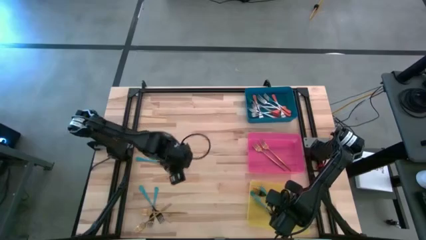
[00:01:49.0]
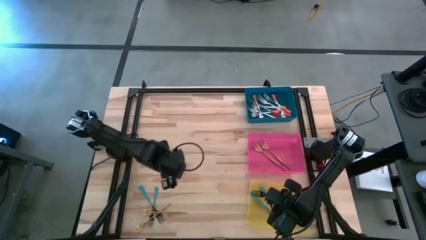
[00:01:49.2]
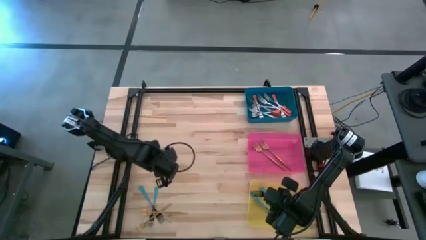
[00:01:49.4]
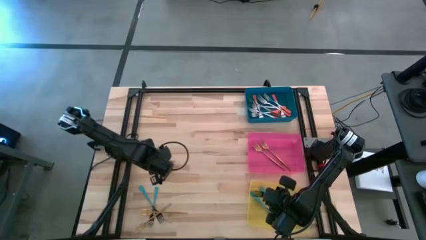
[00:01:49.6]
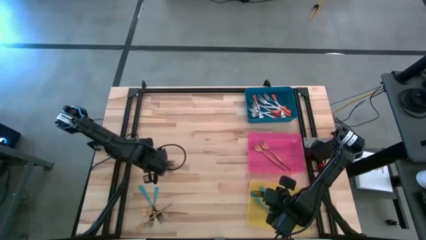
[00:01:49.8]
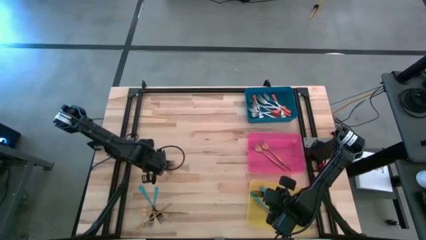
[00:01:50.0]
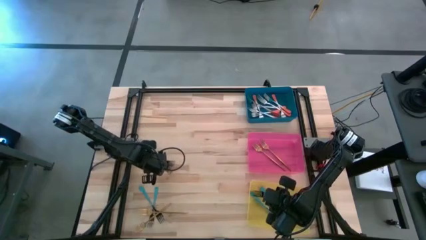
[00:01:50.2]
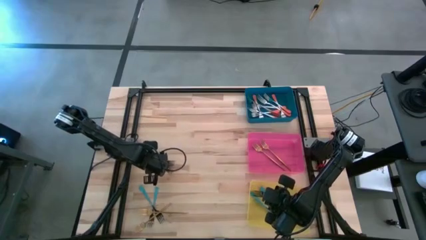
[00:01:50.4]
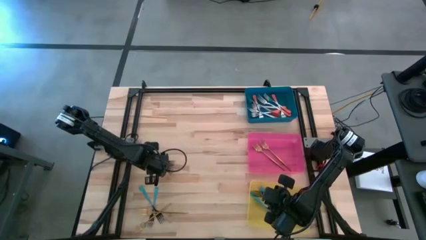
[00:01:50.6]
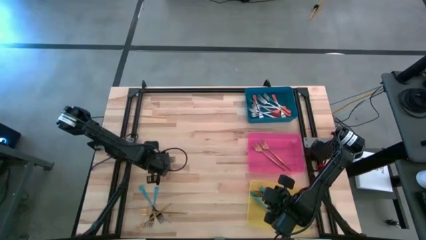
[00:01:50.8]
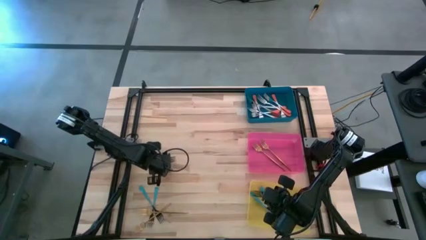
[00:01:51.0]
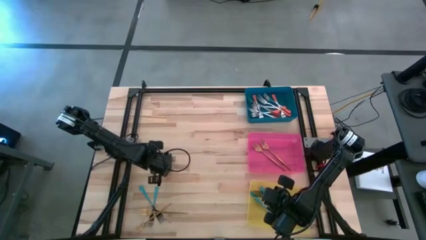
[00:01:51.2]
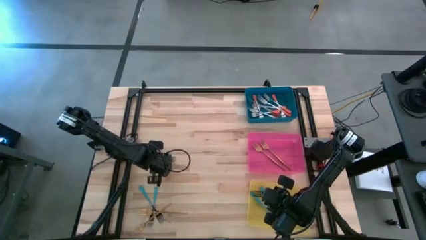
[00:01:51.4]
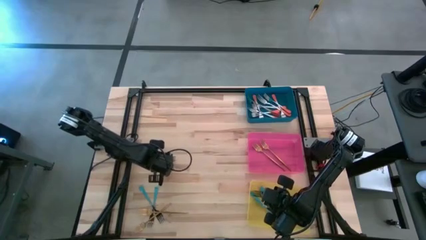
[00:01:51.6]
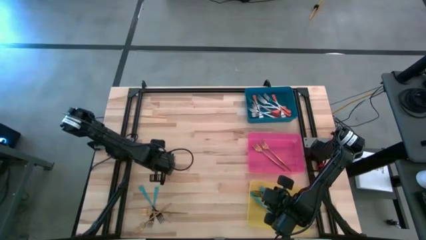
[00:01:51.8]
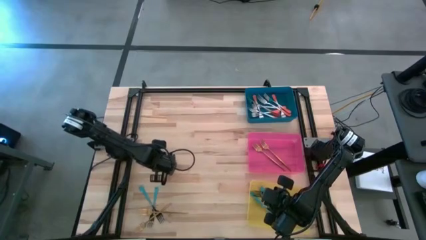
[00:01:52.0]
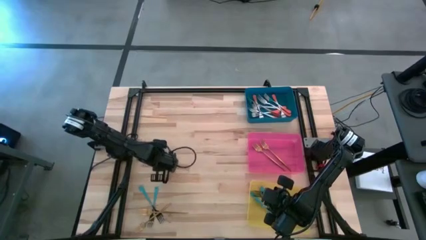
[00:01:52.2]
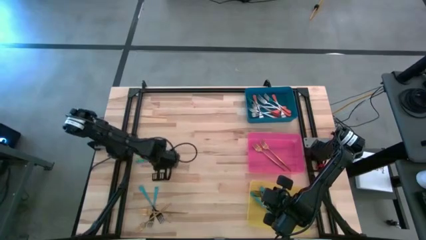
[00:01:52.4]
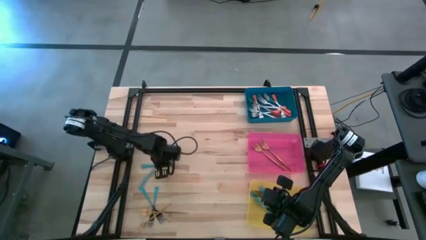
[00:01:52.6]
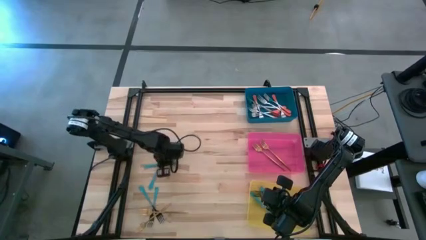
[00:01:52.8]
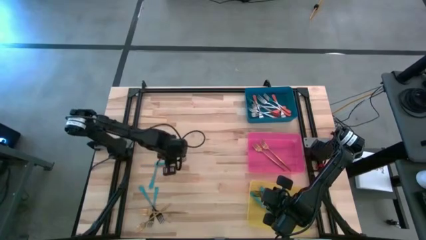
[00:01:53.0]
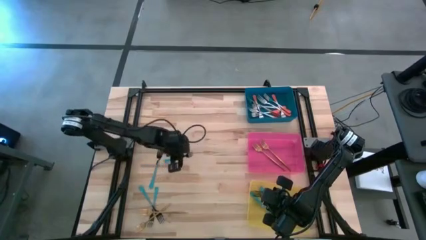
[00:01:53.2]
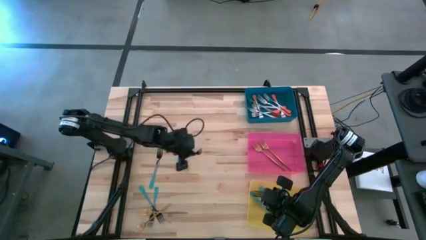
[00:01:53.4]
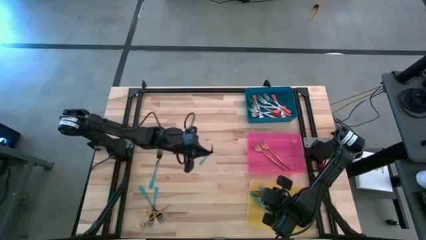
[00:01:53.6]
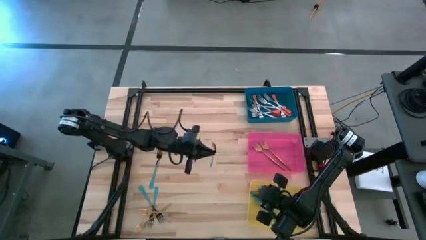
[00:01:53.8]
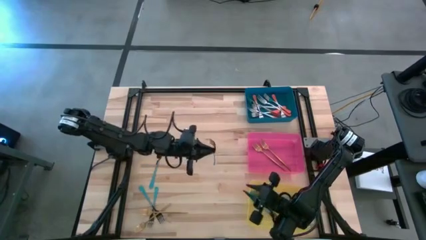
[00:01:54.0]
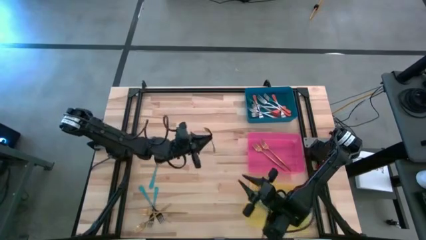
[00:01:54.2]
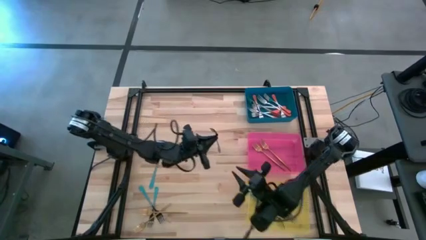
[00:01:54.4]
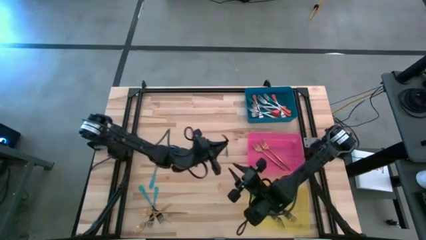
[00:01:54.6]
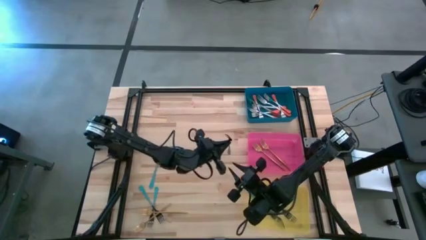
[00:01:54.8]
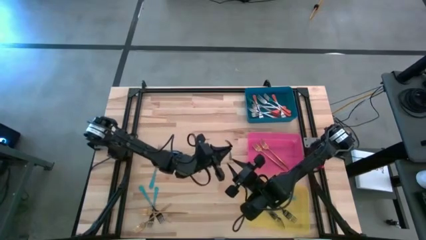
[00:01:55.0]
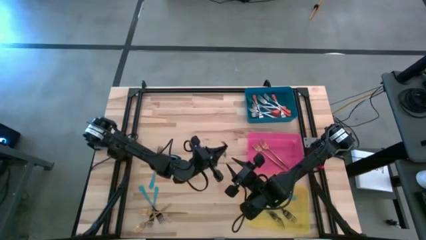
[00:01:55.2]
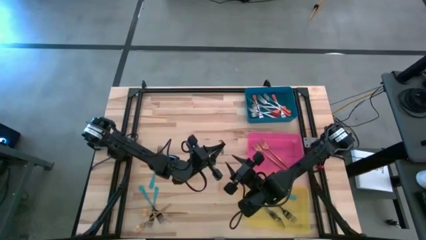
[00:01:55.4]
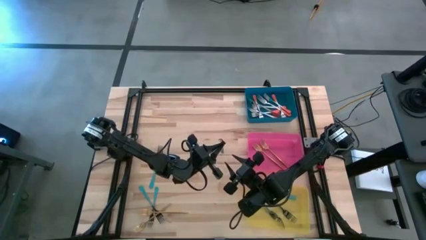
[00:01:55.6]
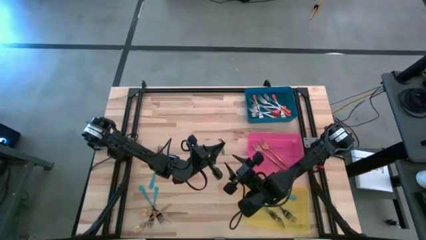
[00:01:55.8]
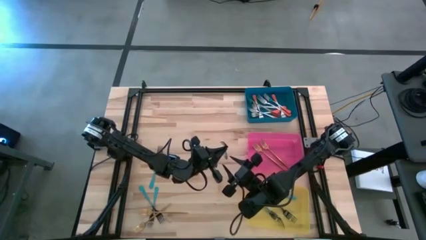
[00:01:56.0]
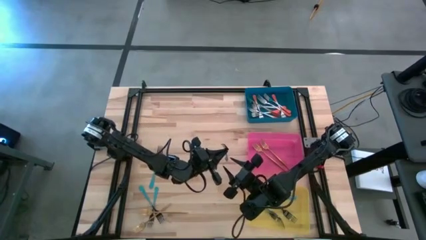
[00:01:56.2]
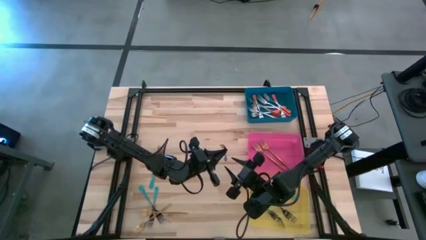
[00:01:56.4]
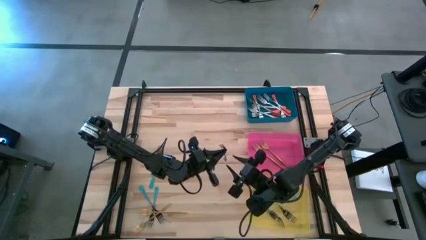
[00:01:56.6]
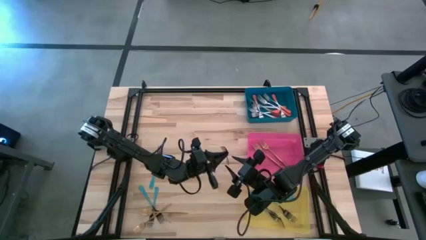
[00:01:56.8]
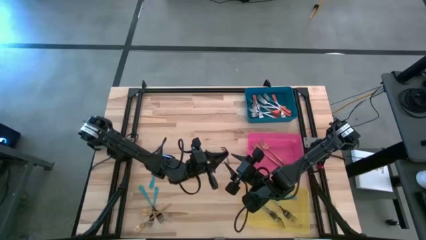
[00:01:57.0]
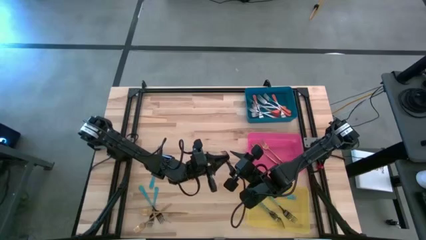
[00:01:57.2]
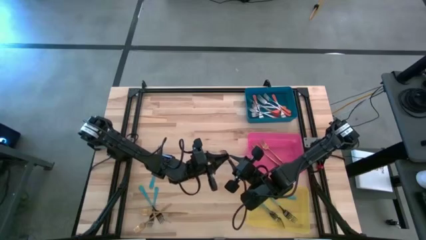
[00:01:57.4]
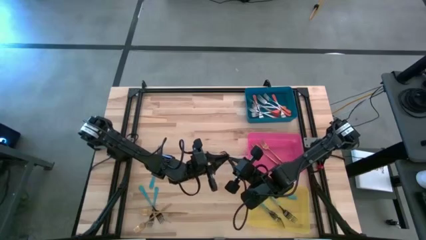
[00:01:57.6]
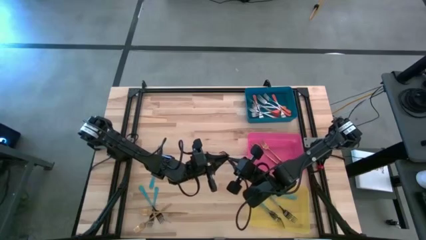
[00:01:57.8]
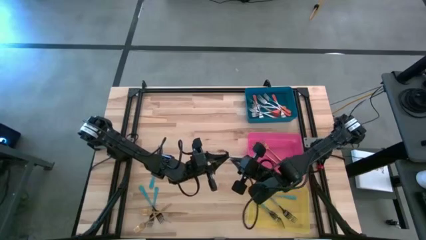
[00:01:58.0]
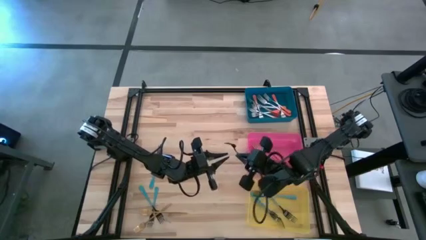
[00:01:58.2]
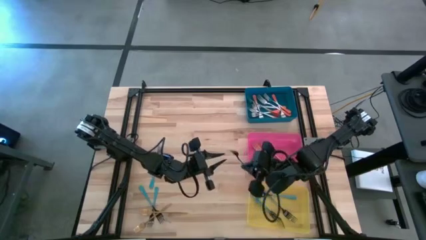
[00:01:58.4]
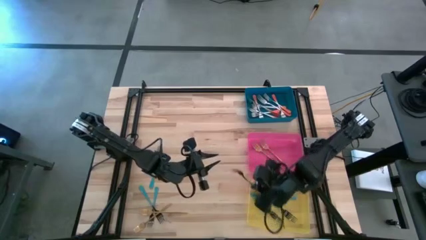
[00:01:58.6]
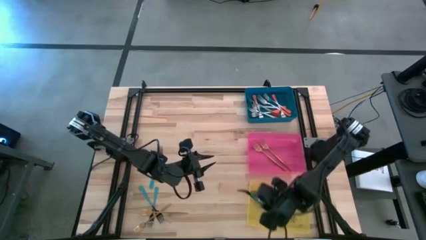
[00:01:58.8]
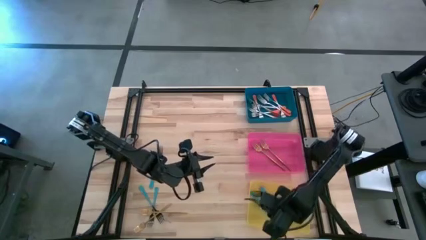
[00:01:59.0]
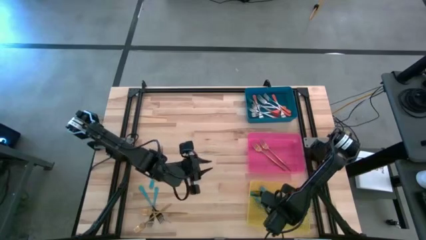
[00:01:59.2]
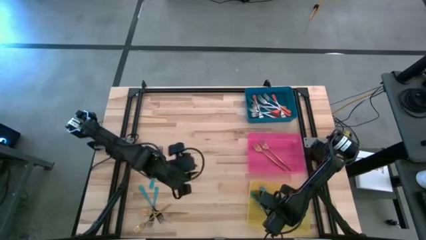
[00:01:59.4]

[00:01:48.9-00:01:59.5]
Task: Sort silverware by color (type)
Put the blue fork into the yellow bin

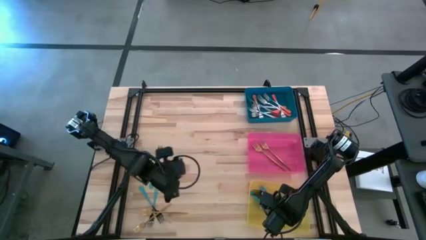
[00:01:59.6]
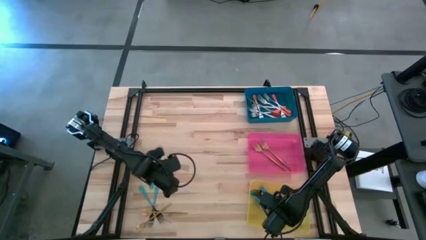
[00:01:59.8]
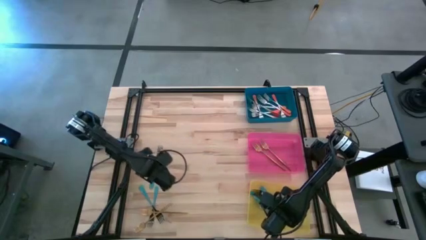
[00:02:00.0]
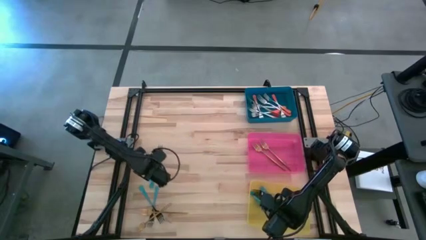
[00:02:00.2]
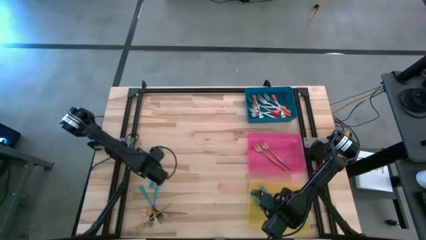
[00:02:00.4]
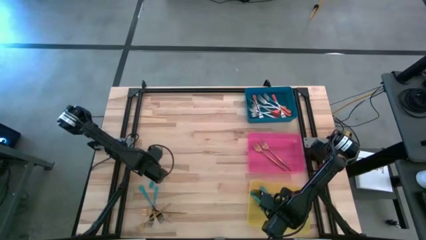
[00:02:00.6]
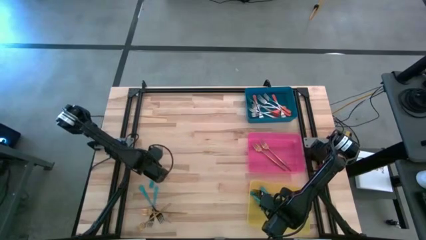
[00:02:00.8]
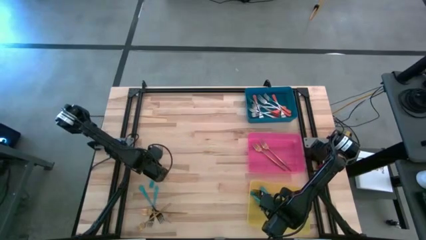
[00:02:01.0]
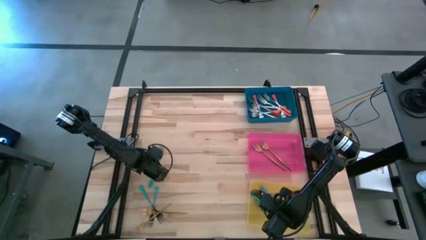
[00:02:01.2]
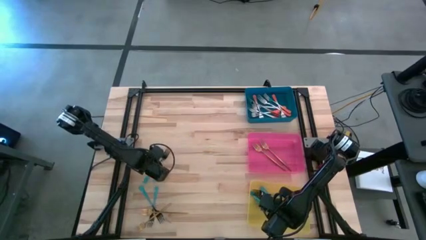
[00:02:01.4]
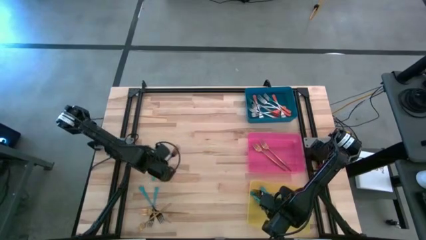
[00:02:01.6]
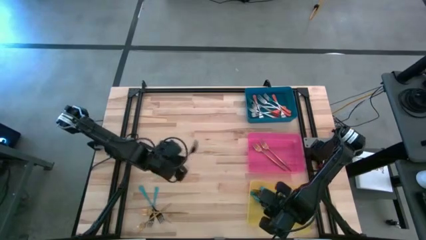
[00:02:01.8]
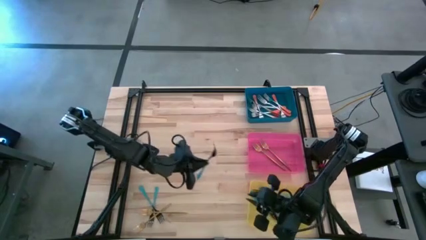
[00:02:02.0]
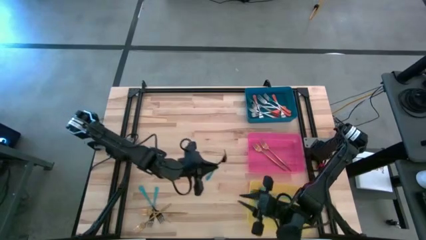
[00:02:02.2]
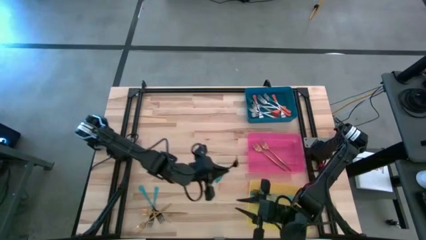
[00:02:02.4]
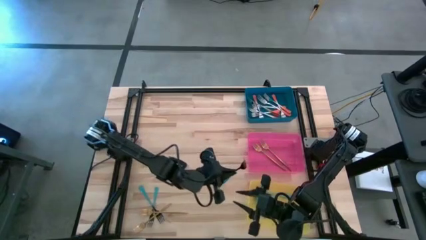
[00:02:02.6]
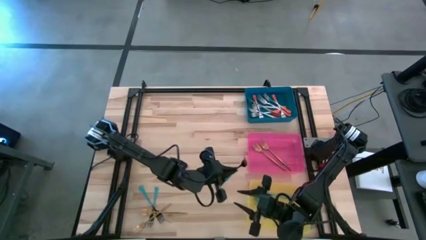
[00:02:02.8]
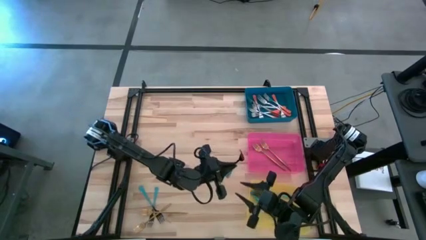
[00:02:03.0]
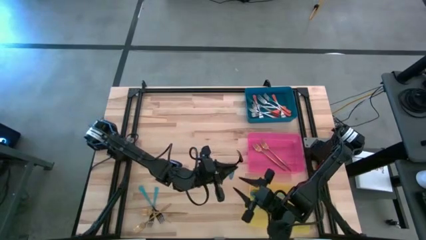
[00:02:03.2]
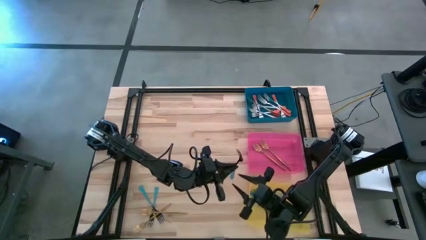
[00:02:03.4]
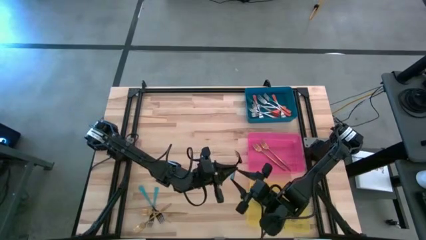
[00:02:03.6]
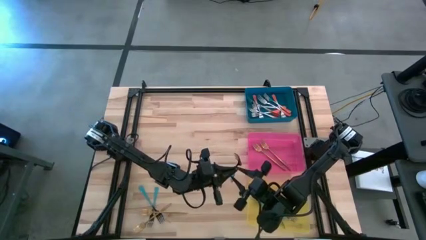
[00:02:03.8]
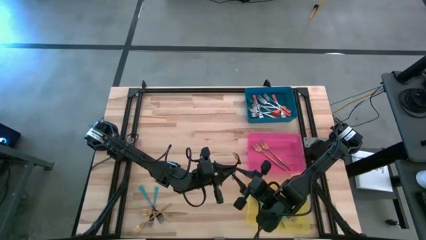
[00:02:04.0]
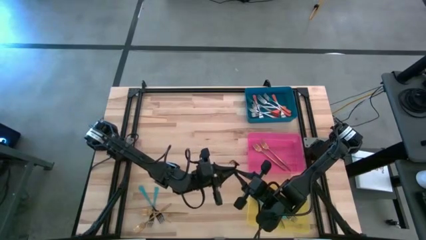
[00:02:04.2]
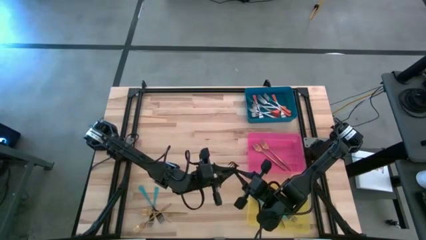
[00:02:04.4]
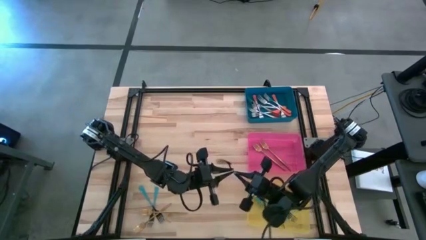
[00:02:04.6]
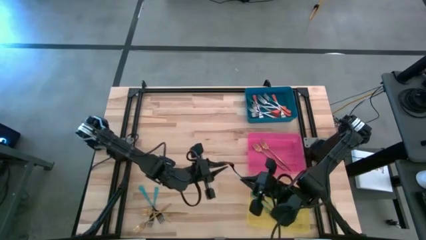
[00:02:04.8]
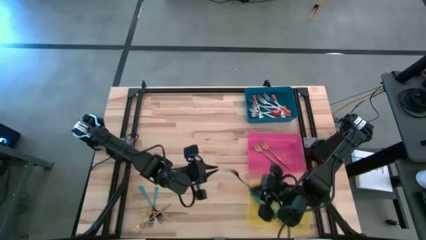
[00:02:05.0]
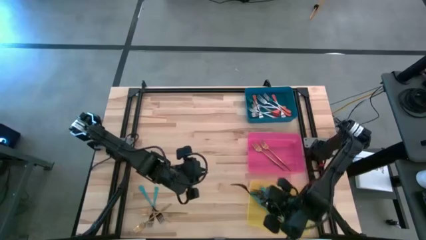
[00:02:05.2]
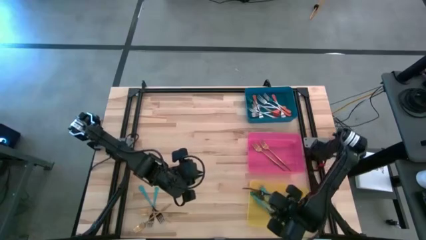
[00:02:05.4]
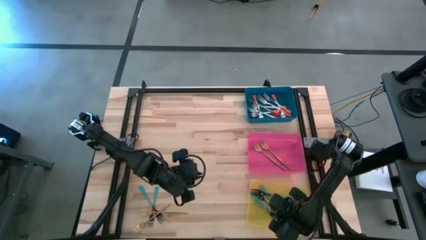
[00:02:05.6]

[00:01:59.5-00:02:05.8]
Put the blue fork into the yellow bin
